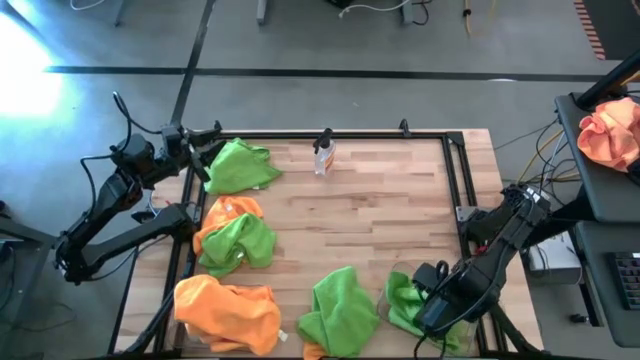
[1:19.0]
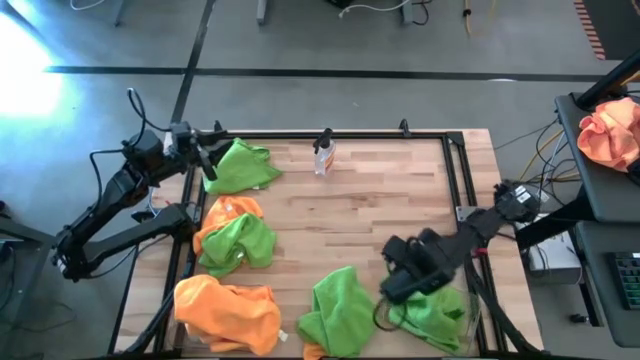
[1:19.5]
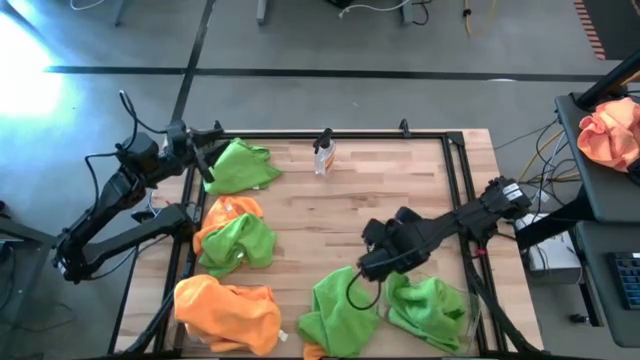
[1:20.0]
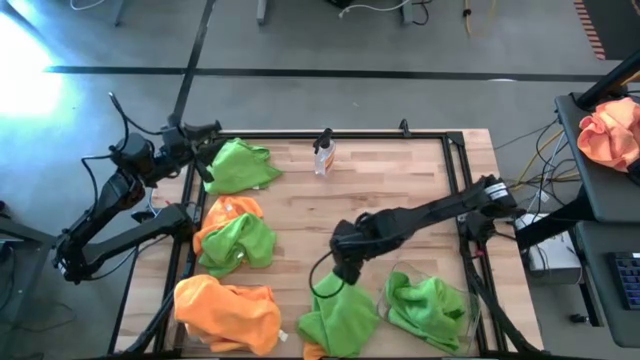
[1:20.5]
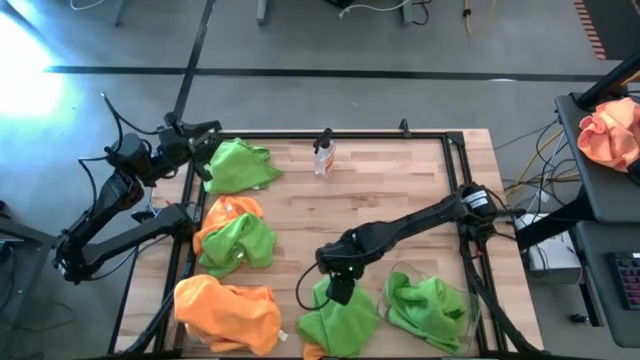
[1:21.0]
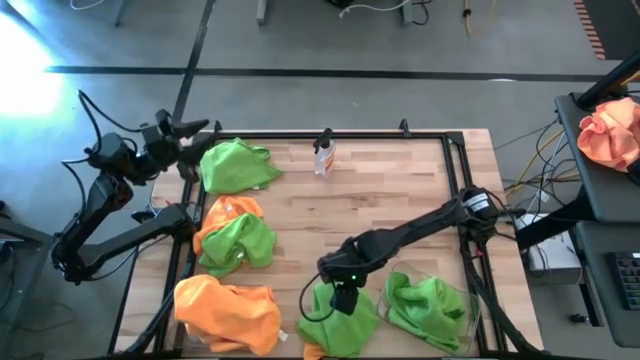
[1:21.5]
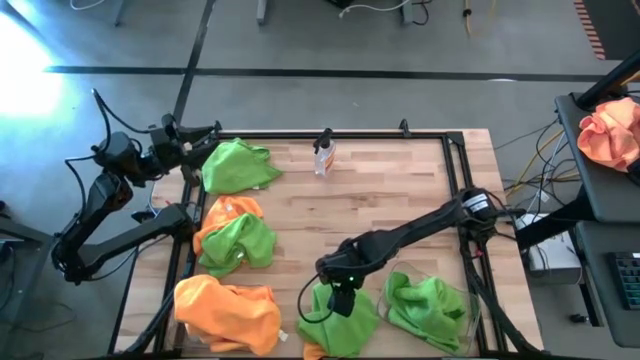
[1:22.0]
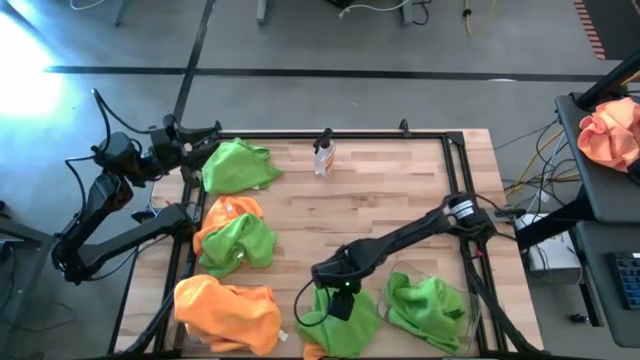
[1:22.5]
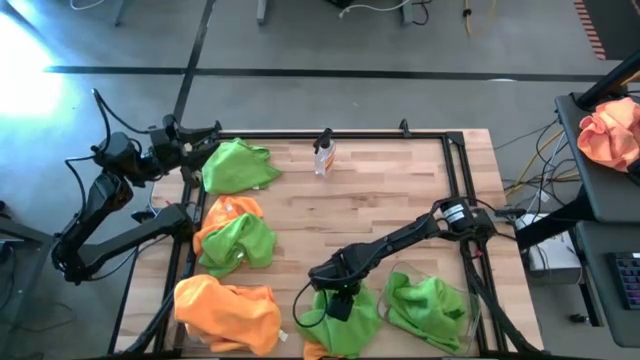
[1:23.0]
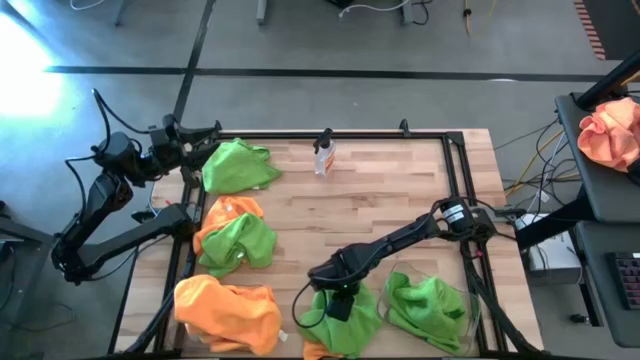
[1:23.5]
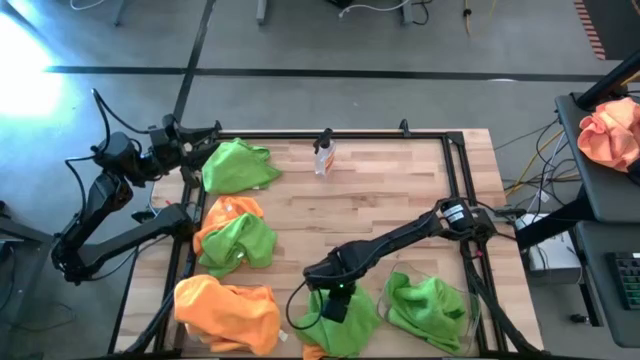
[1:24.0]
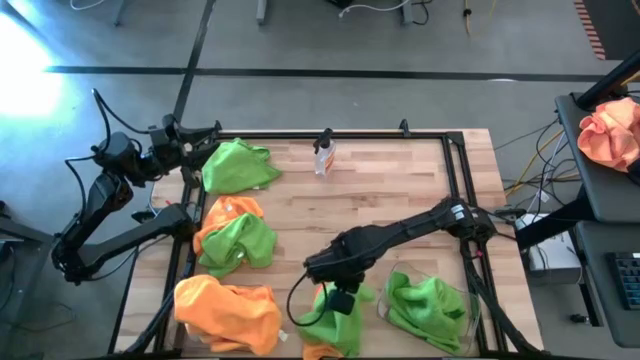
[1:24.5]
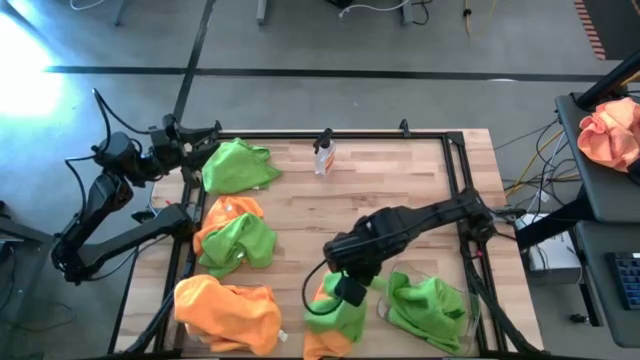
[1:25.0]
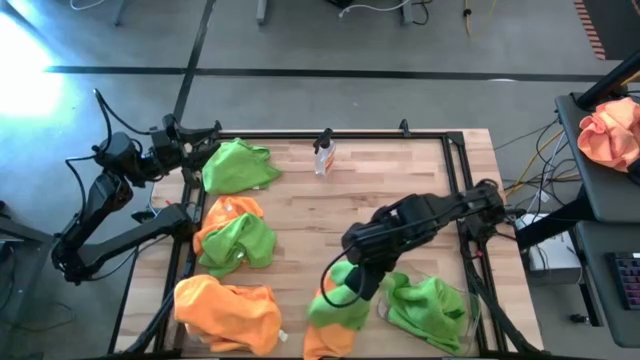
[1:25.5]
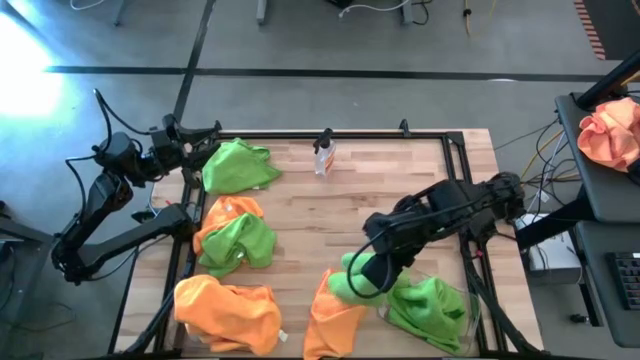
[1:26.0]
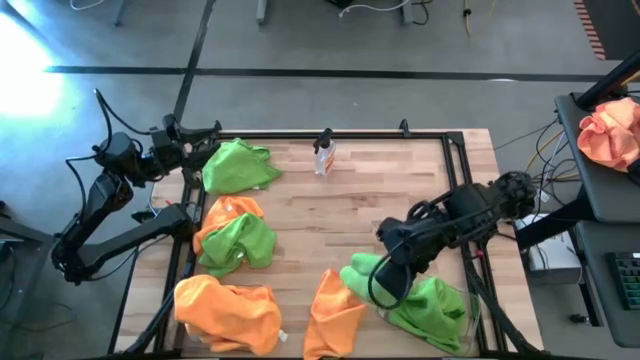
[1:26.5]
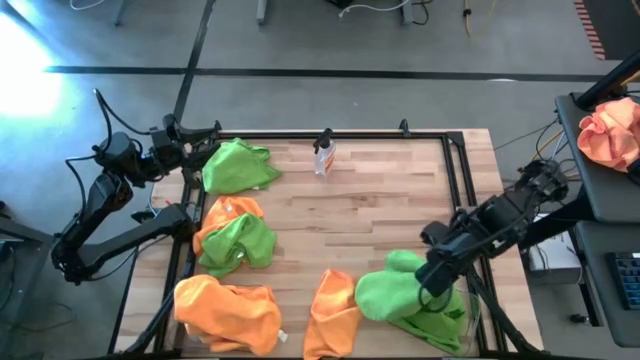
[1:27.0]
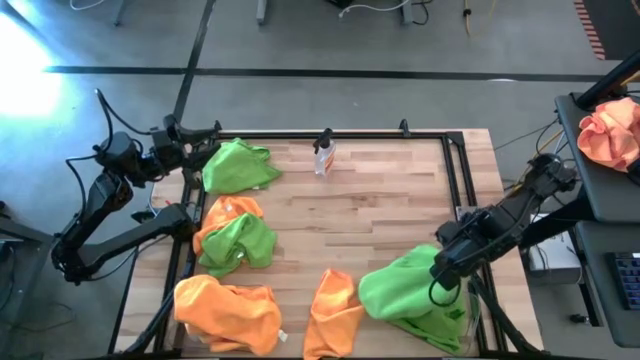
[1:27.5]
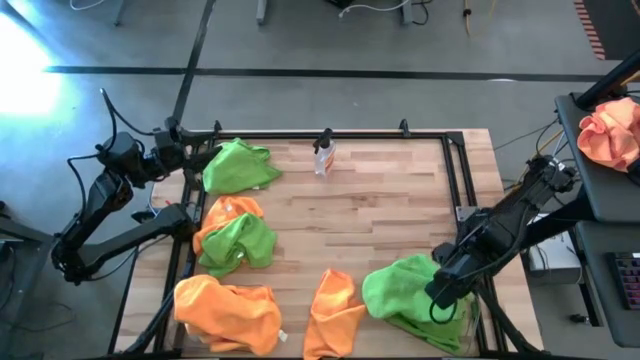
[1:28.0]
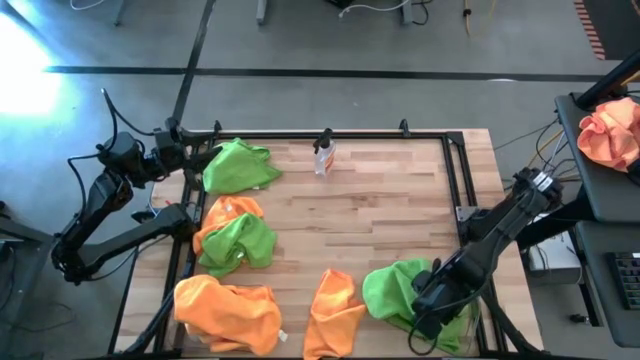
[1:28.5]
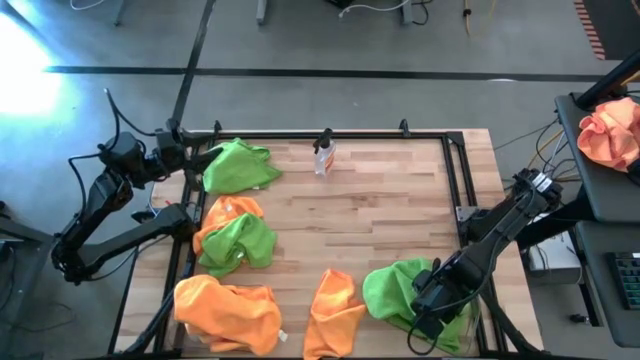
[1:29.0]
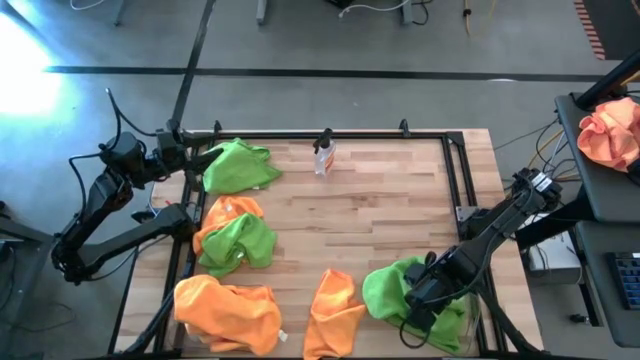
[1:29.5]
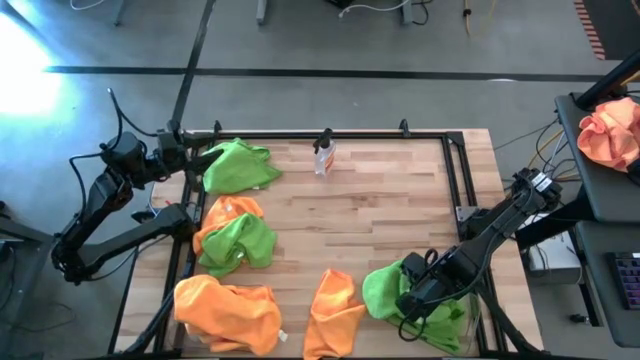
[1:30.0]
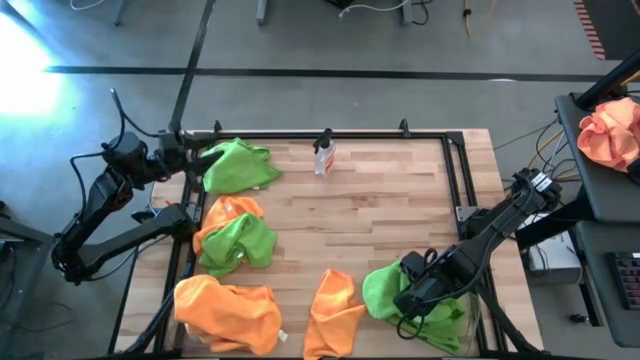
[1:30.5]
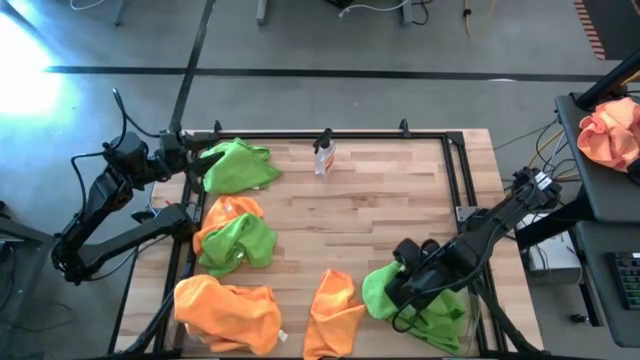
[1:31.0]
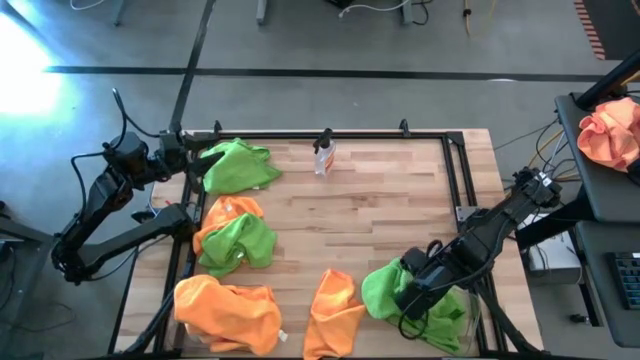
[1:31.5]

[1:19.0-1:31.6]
Task: Sort microfiber towel by color & place in baskets
Put the green microfiber cloth into the right transparent bin

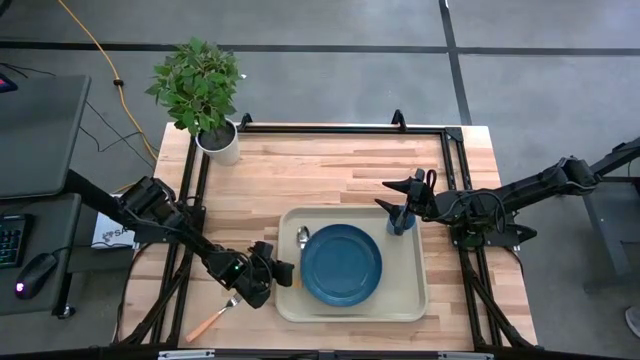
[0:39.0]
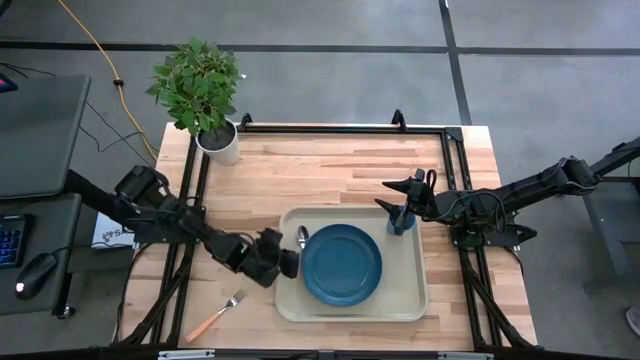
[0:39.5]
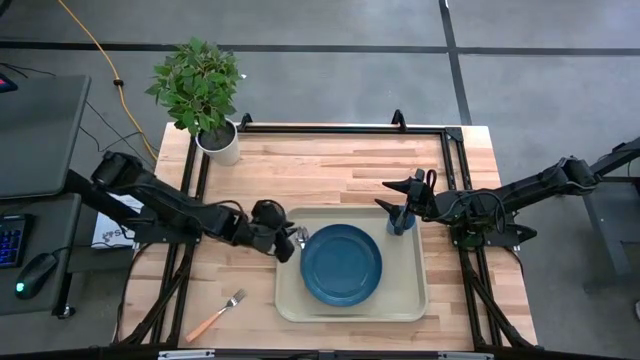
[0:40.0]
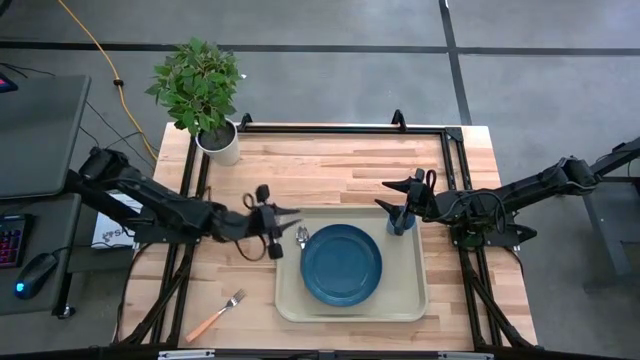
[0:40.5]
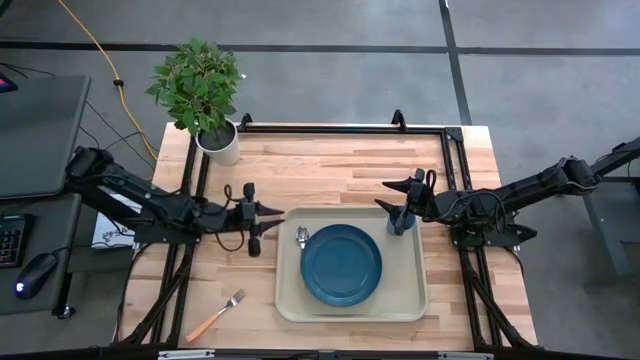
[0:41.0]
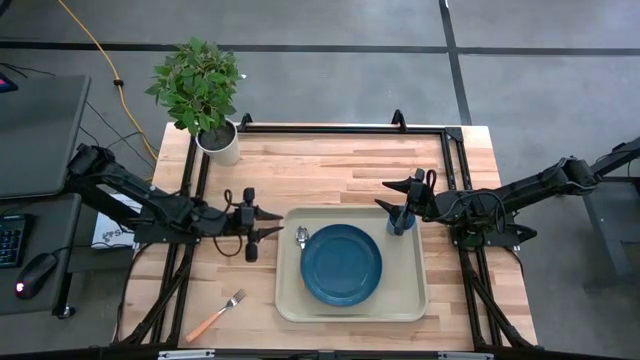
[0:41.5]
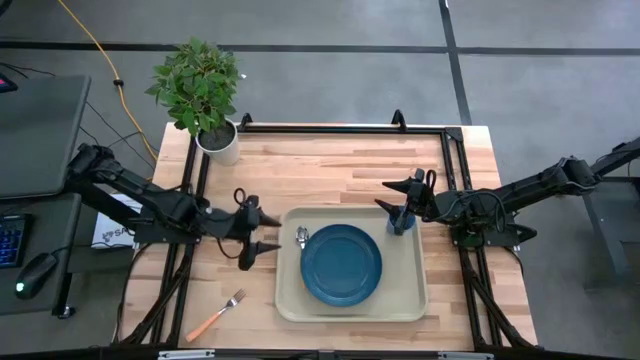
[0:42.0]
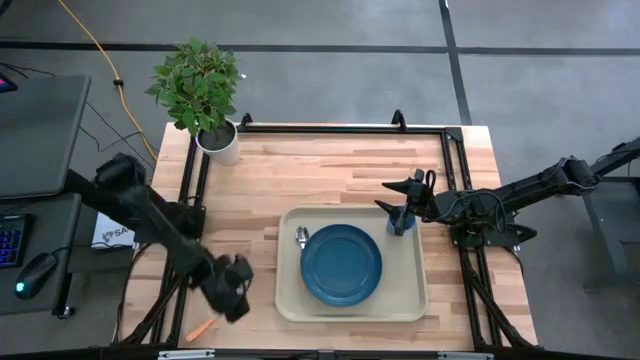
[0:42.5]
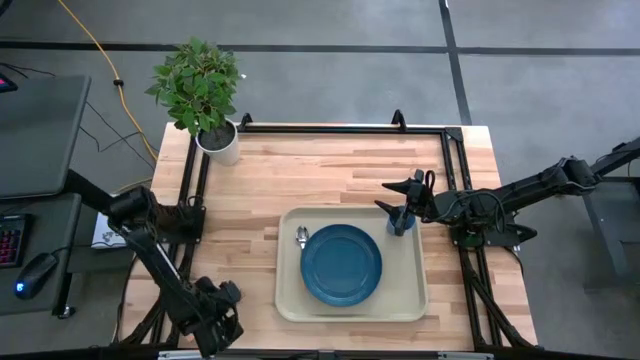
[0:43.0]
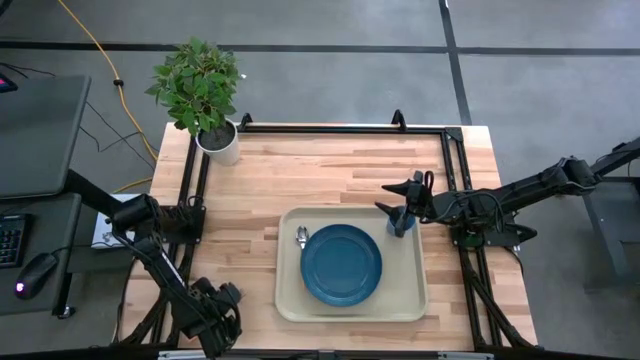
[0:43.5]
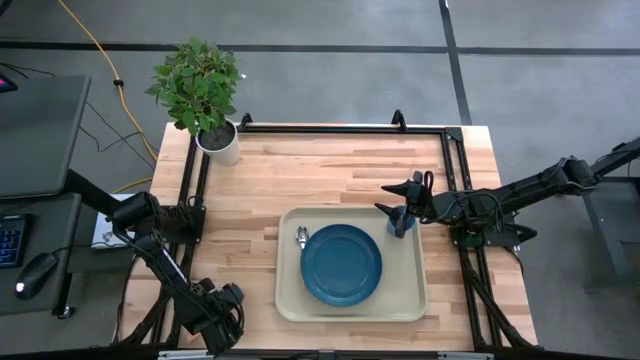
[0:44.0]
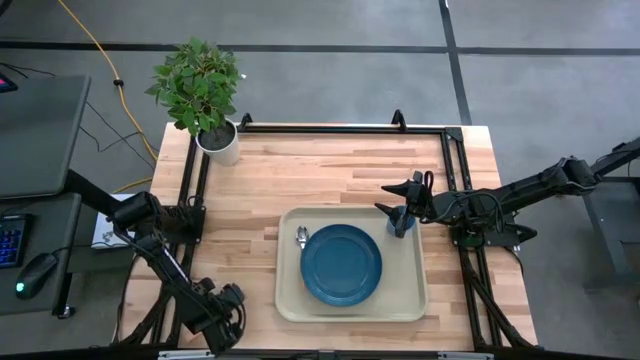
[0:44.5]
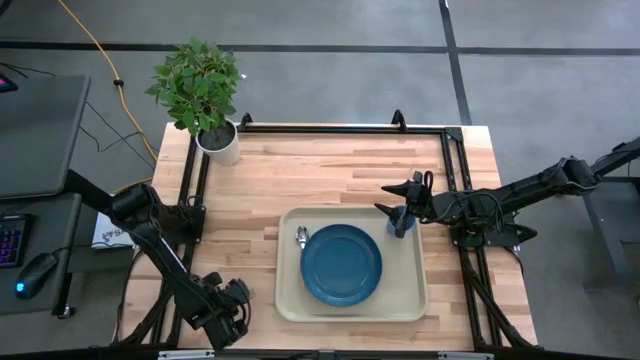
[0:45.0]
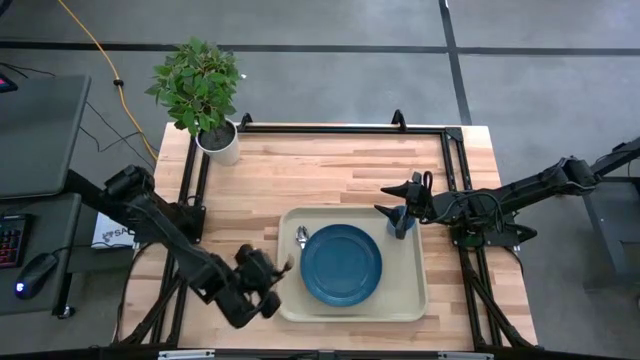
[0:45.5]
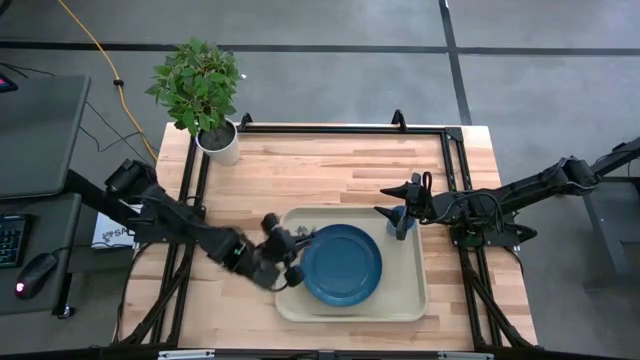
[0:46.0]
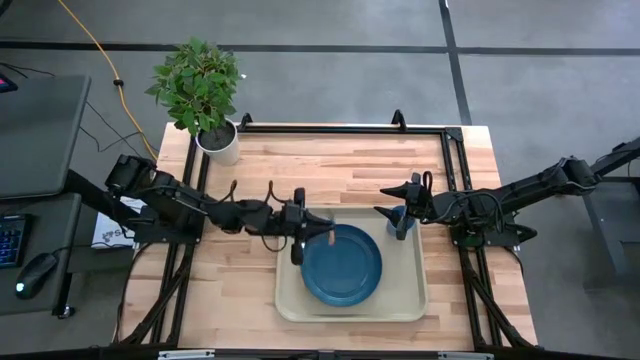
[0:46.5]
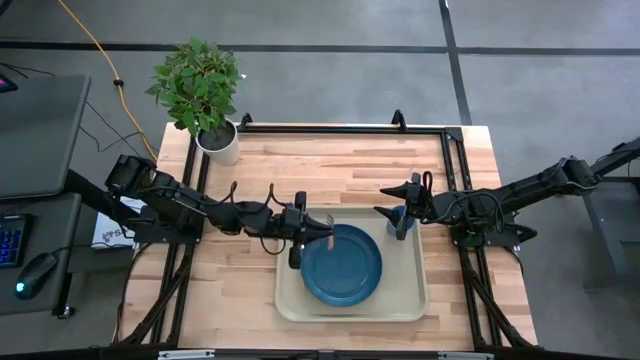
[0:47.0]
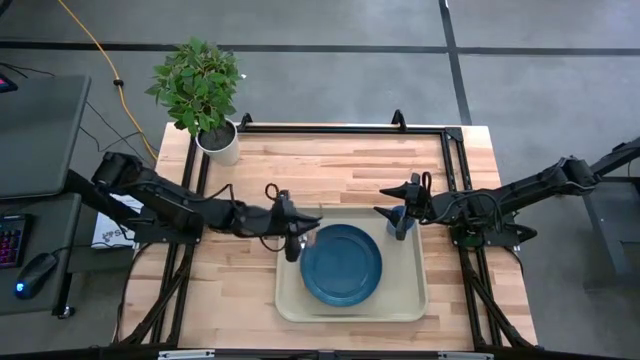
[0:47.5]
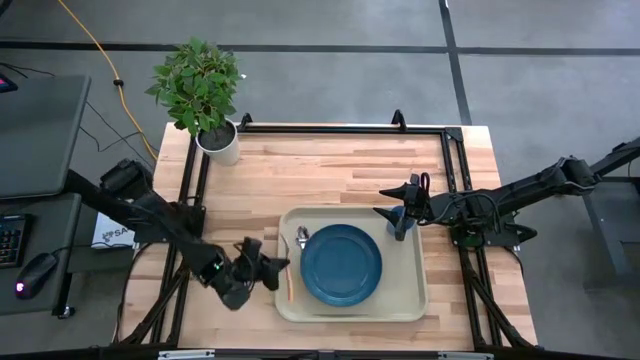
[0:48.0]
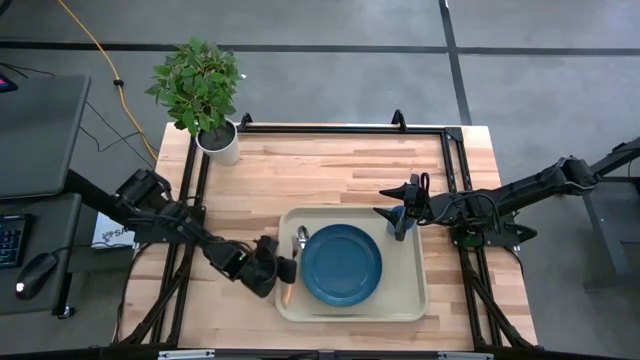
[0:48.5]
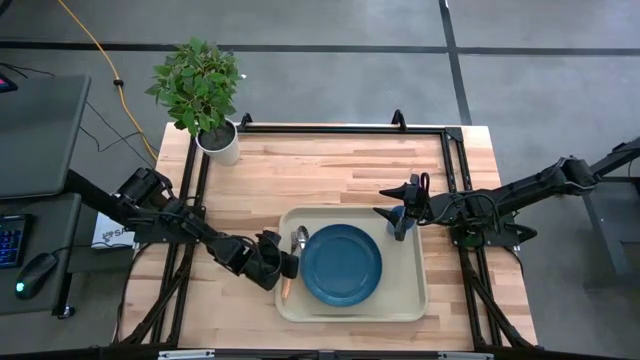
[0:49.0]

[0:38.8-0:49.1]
Task: Pick and place plate/cup/fork/spoon on tray
Put the orange fork on the white serving tray to the left of the yellow spoon
